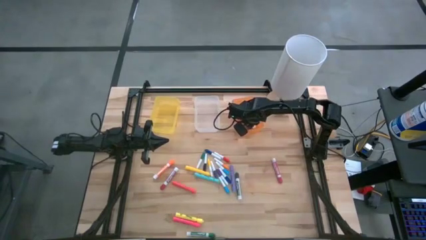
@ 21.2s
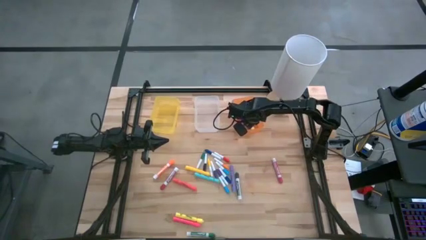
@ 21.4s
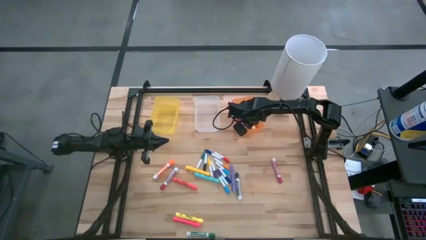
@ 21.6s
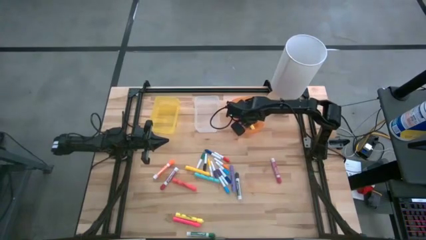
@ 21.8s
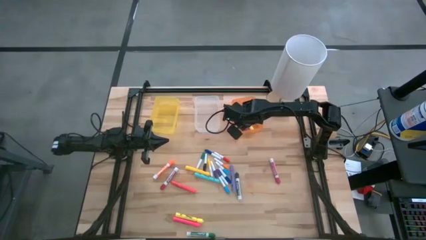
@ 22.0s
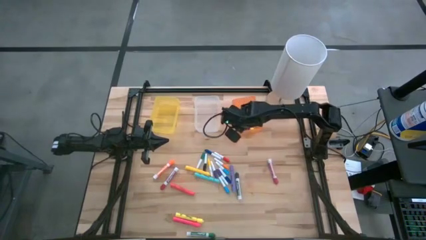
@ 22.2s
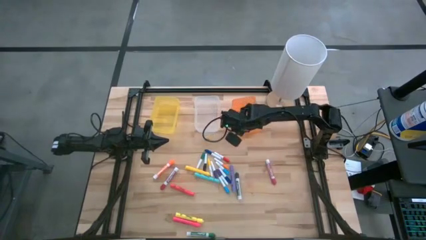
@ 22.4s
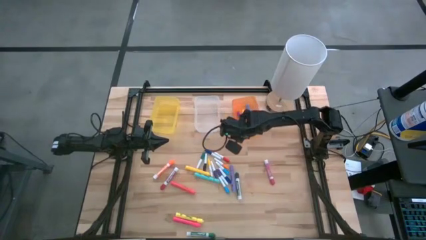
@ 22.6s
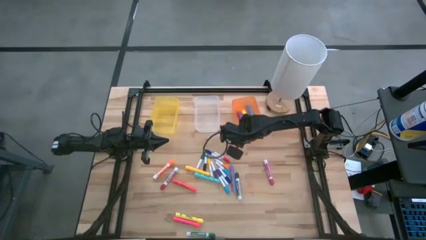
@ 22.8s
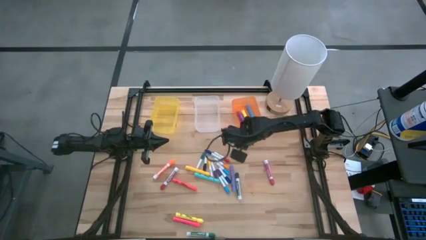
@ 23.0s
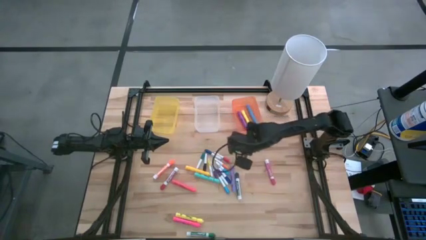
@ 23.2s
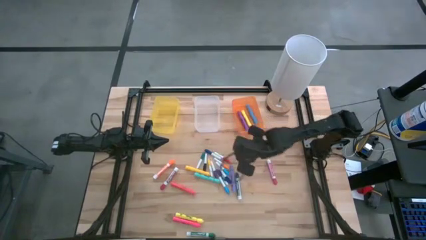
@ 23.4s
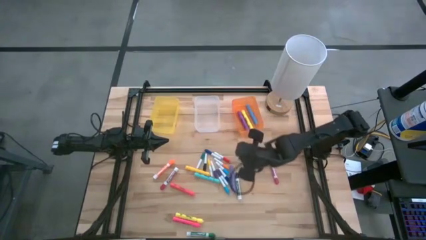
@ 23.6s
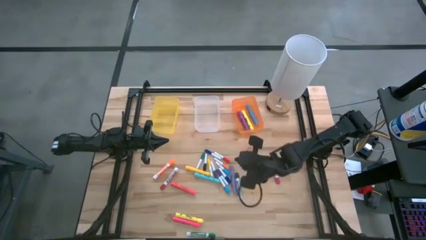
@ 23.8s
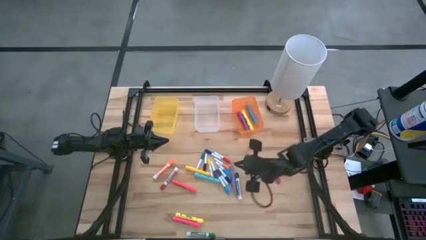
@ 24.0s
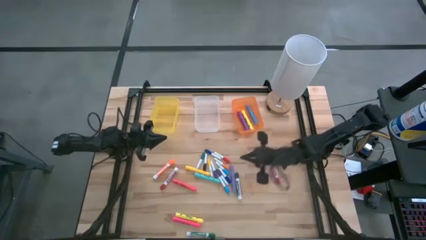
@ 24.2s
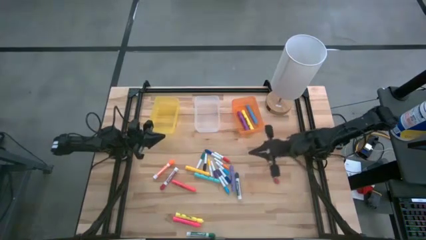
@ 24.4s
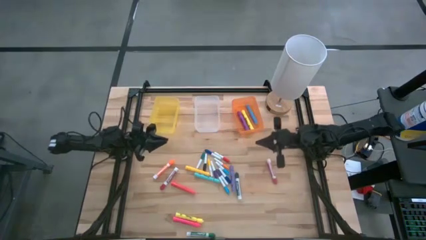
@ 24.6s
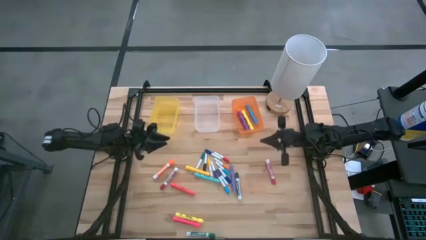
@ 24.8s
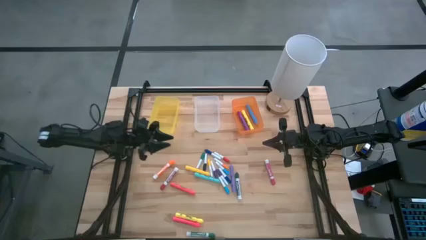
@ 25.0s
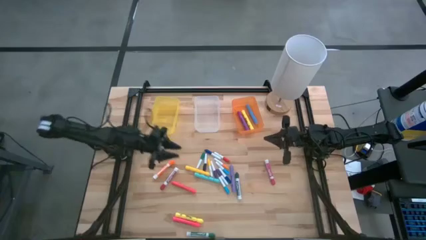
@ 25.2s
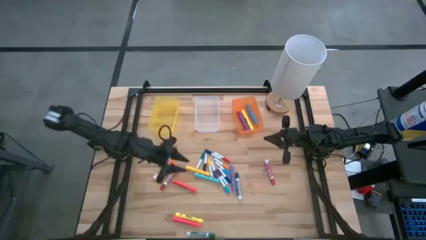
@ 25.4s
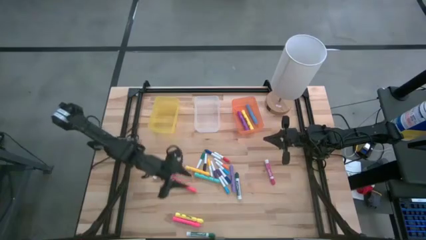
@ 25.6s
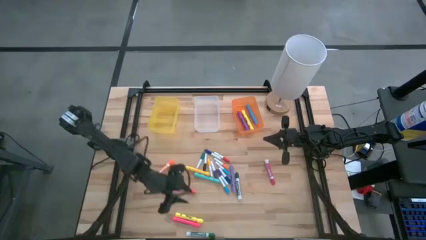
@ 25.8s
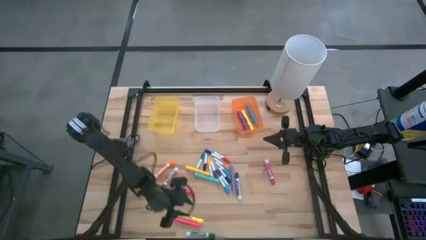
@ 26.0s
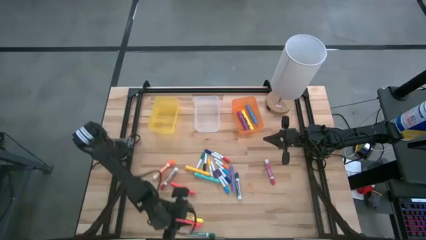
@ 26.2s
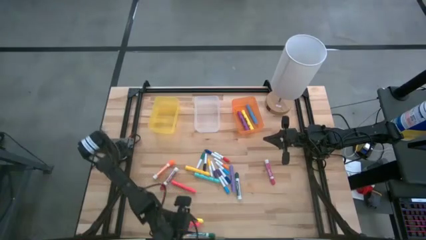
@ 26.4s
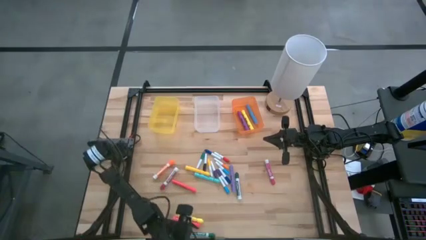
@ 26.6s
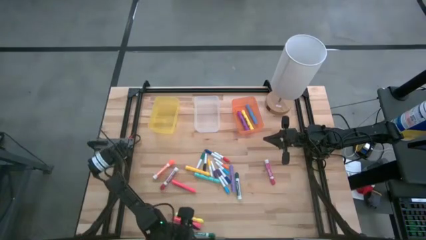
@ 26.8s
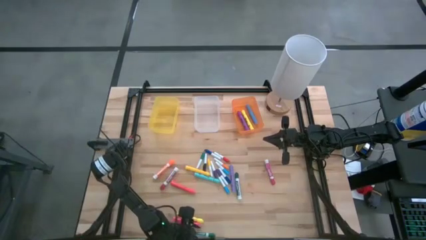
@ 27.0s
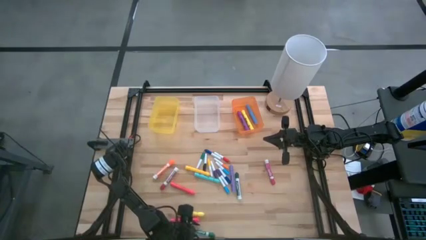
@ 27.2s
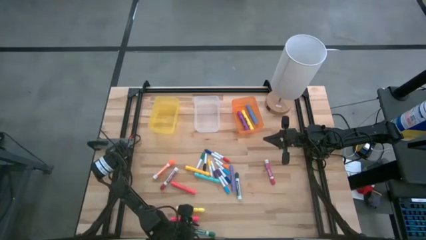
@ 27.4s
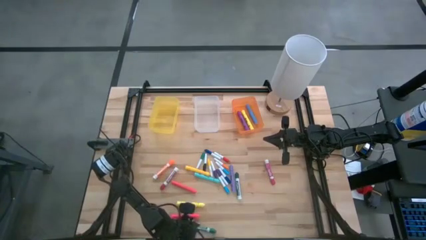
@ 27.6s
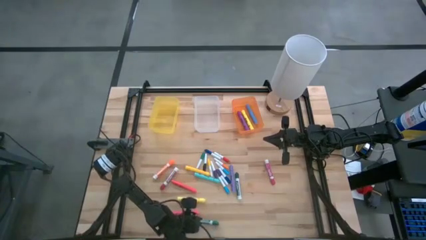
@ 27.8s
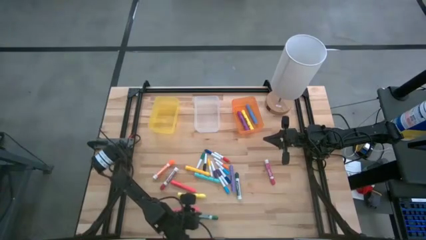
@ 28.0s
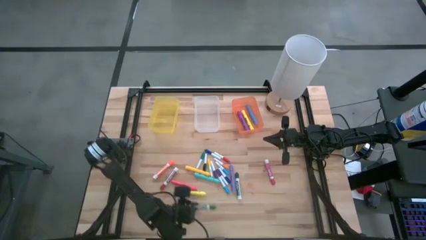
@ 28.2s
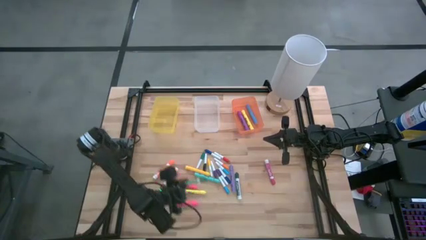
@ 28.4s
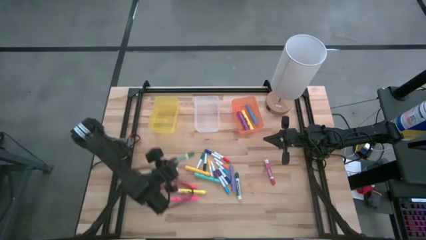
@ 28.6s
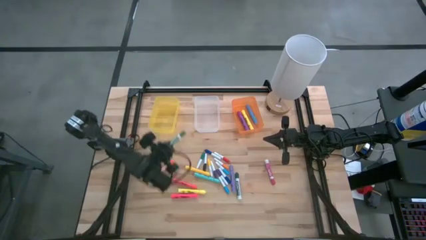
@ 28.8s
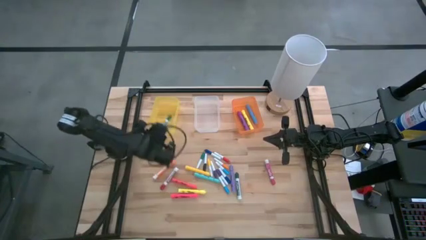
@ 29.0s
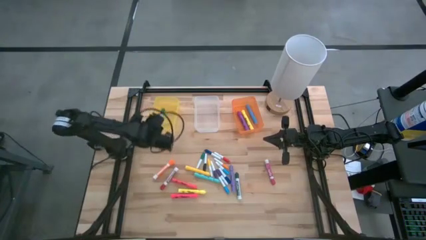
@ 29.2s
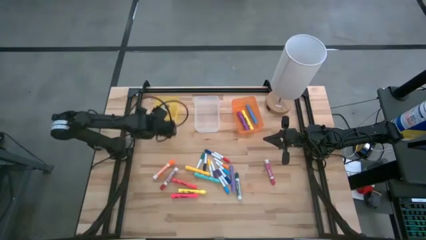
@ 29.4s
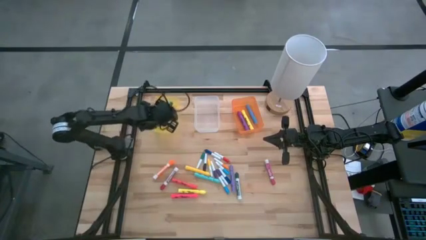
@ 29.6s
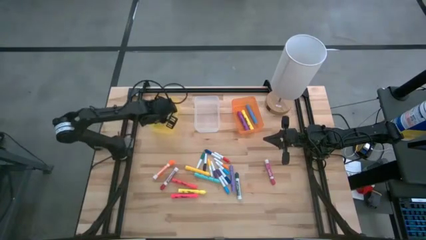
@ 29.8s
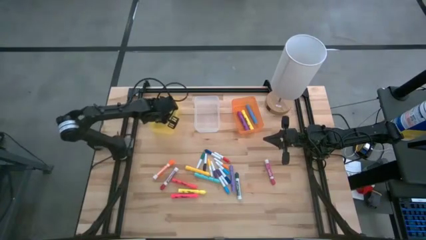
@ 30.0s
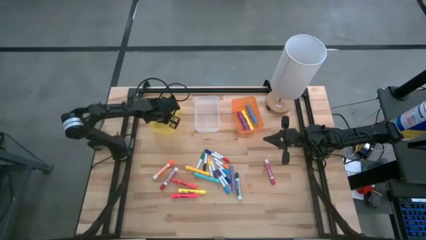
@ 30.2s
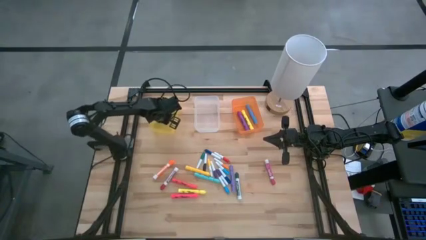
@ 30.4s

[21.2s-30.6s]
Task: Pick & Place Markers
Put the green marker pen into the yellow bin

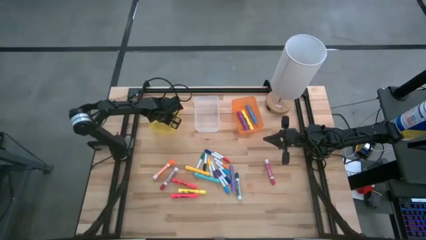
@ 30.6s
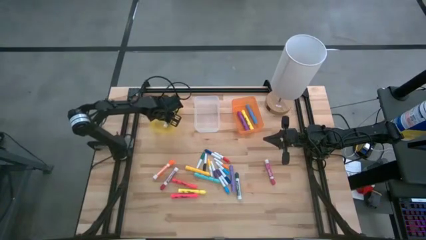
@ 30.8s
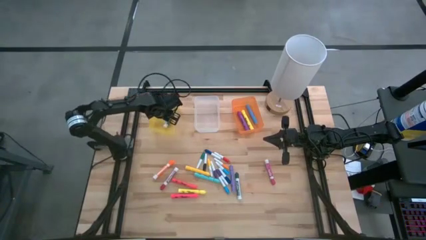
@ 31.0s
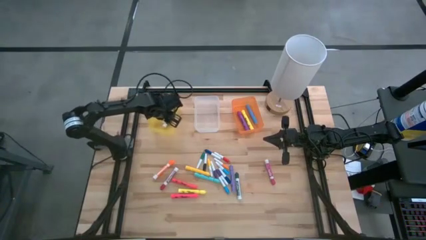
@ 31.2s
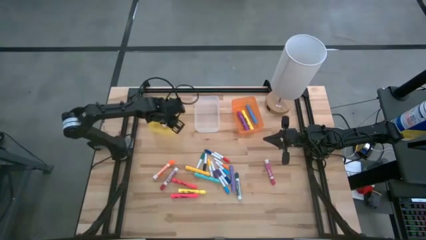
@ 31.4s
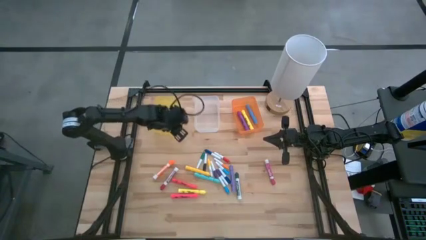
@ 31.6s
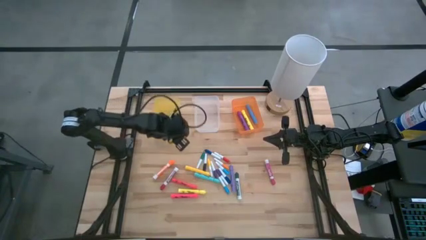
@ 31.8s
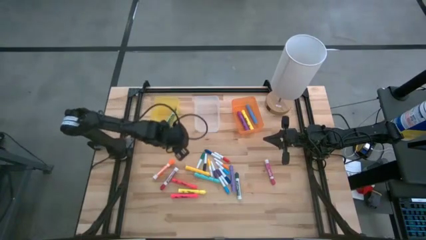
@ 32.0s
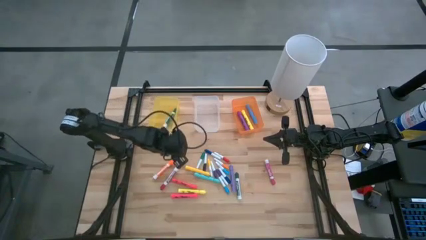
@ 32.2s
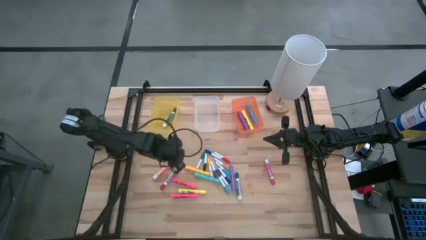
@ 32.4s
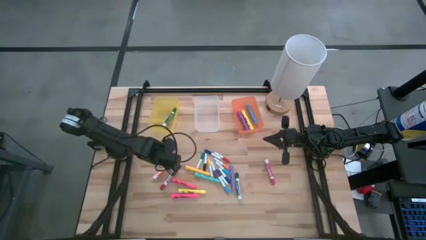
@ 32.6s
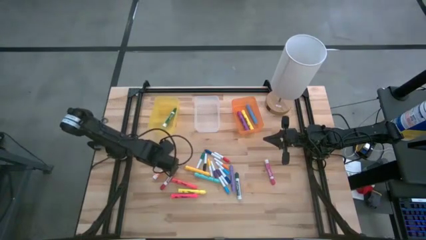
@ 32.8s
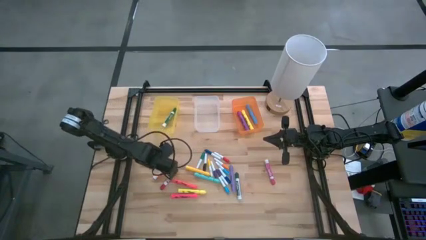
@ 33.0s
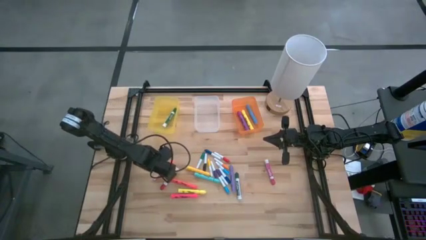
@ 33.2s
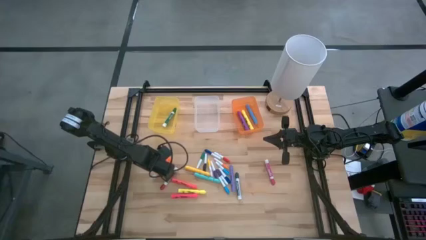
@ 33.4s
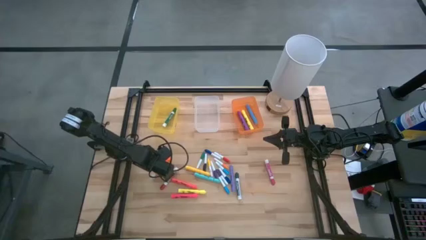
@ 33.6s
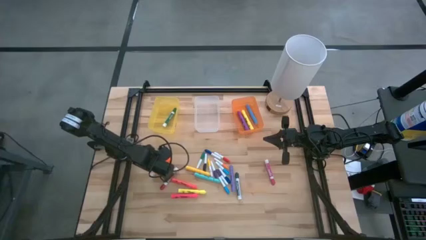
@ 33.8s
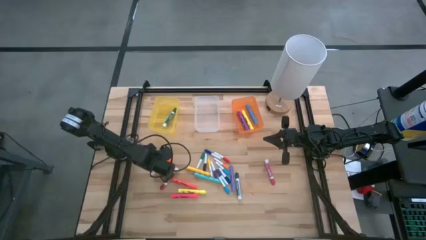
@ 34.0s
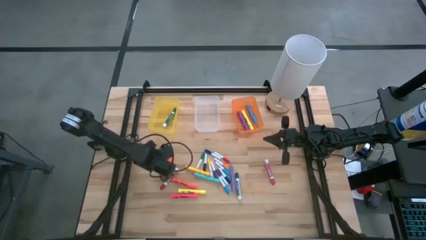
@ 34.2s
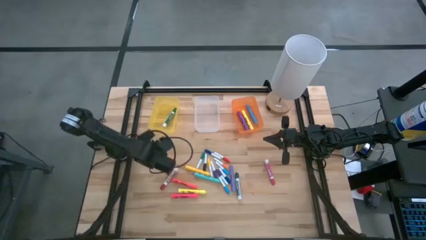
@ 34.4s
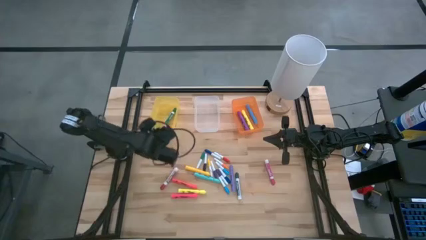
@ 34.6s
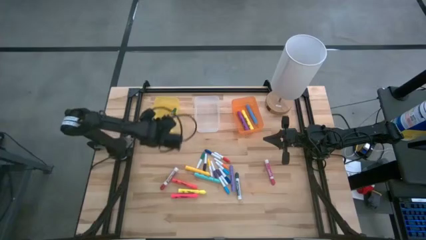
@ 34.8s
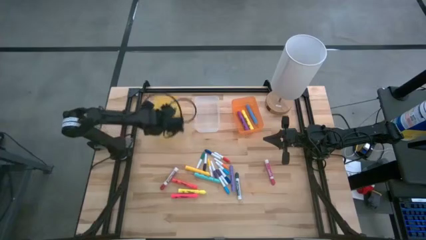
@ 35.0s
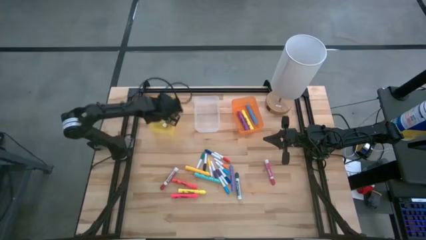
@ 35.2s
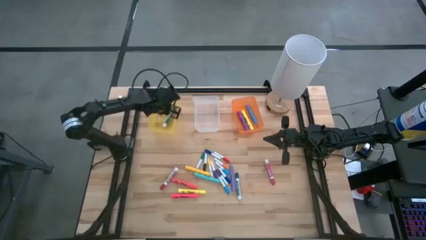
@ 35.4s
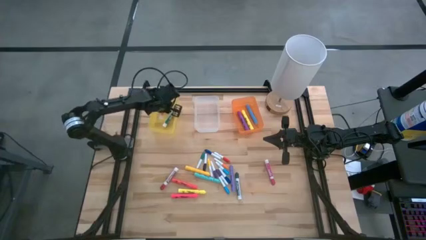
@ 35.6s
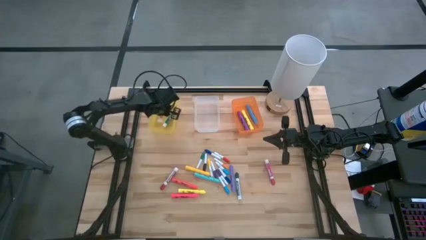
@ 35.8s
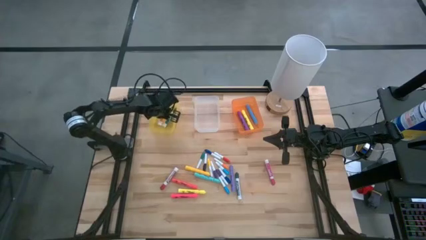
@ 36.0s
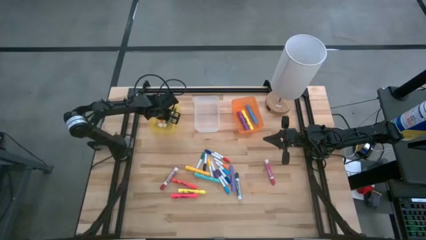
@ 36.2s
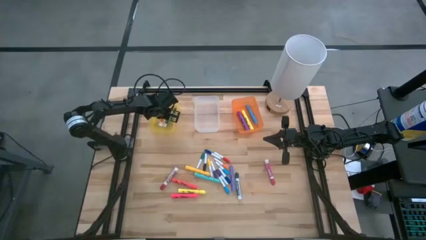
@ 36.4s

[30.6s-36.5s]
Put the orange marker pen into the yellow bin

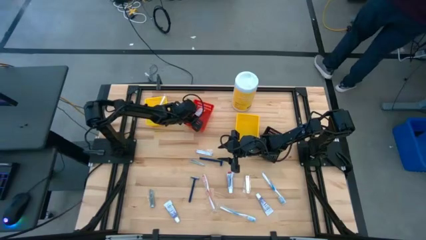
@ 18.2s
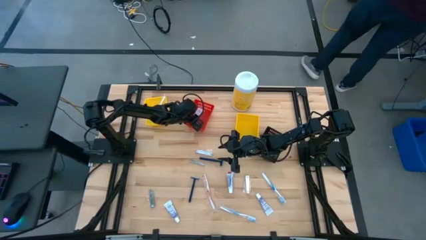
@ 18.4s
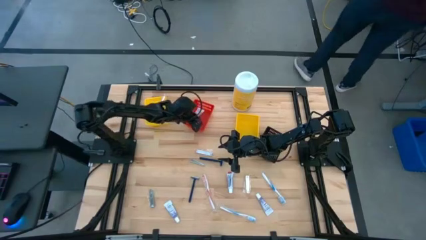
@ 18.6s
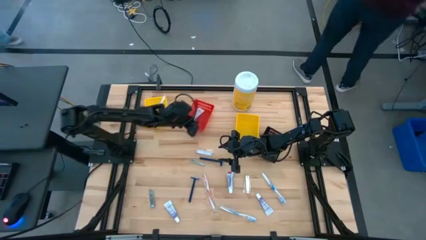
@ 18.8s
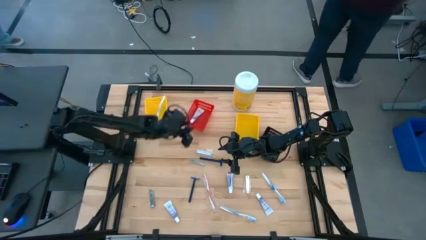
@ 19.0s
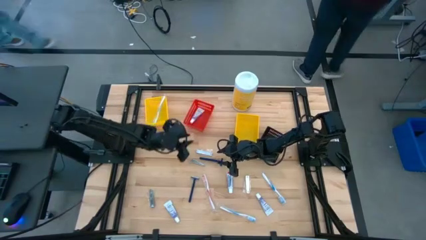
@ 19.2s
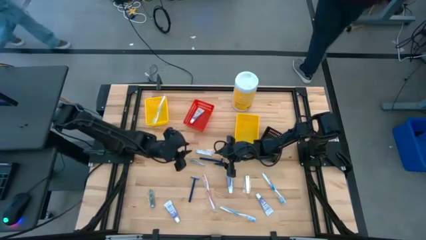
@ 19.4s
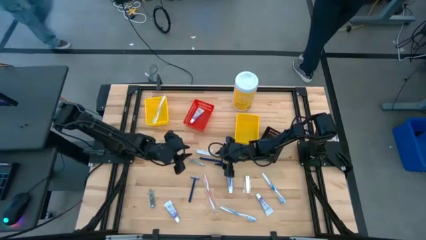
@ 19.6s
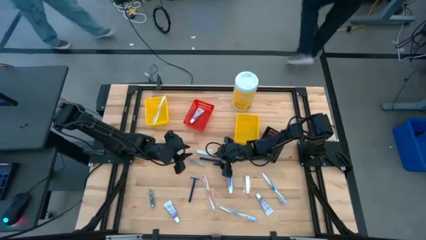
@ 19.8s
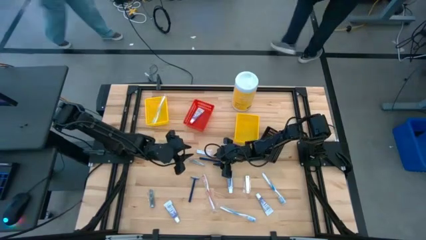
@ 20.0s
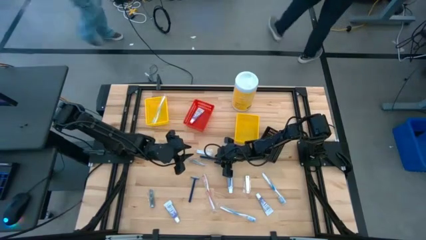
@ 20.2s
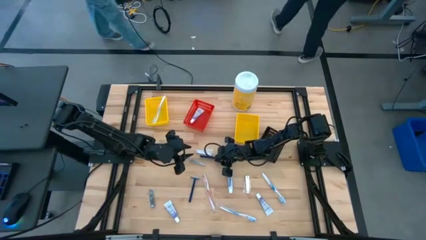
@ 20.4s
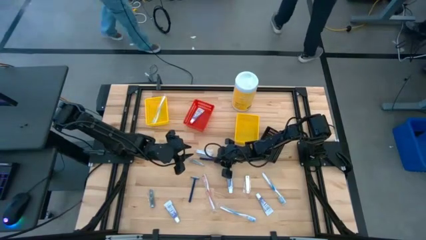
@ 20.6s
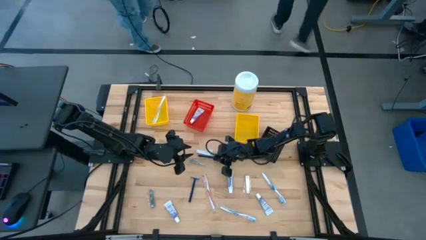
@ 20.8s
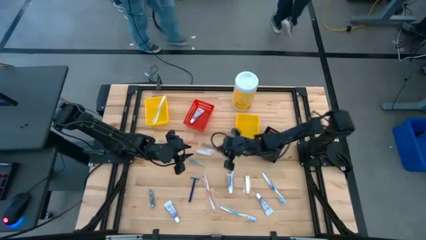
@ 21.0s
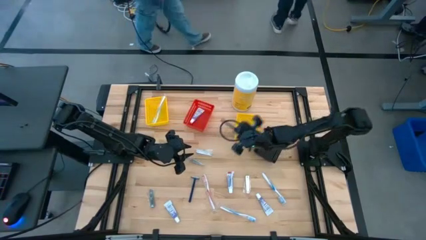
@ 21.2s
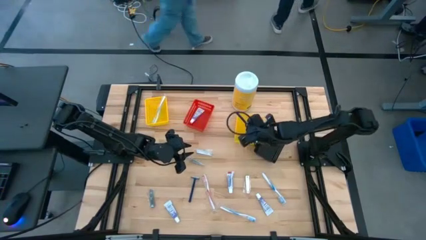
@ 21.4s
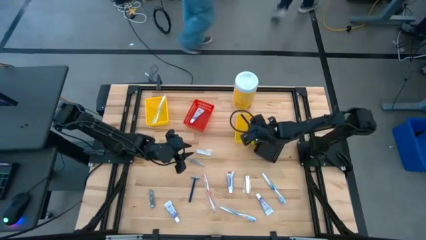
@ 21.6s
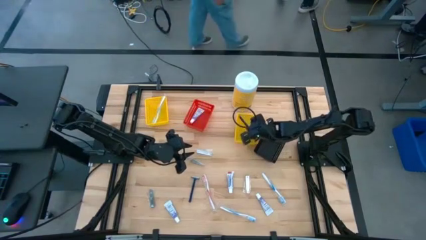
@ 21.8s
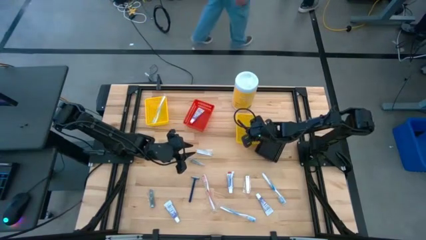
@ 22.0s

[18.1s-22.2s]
Task: Pick & Place Travel size toiletries
Put the blue razor into the right yellow basket
